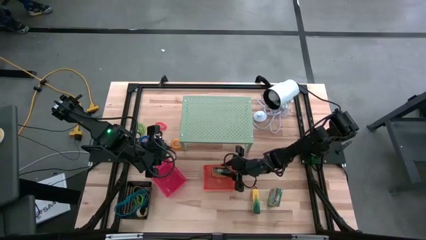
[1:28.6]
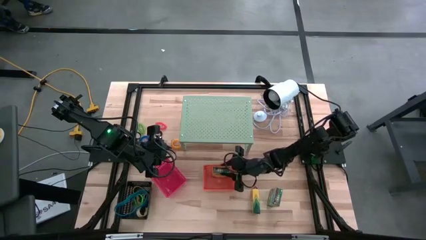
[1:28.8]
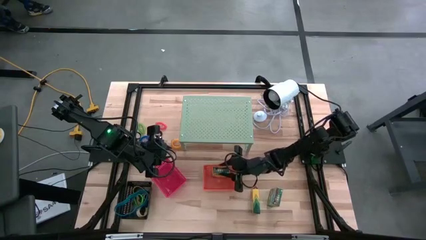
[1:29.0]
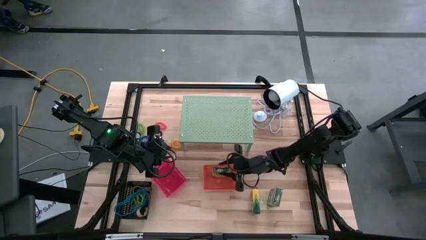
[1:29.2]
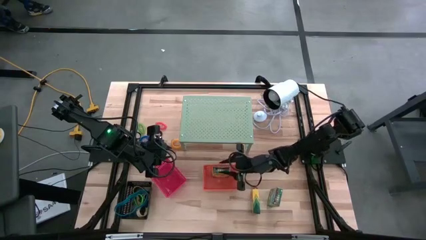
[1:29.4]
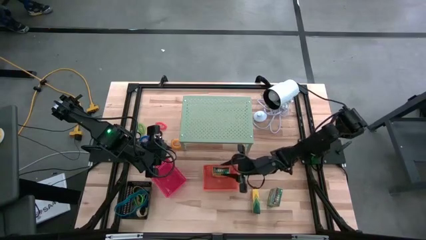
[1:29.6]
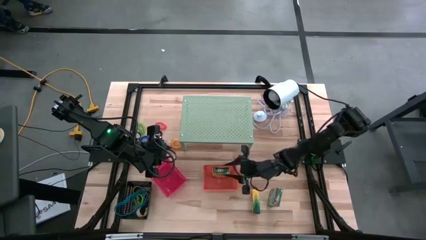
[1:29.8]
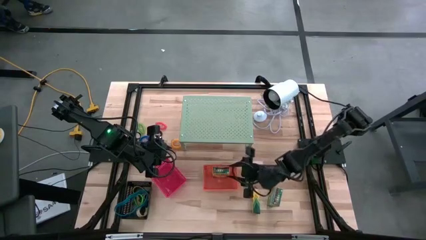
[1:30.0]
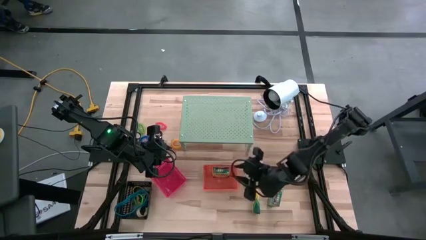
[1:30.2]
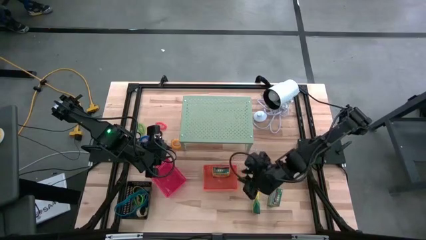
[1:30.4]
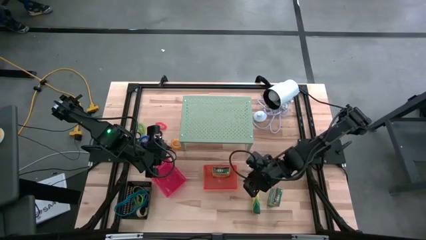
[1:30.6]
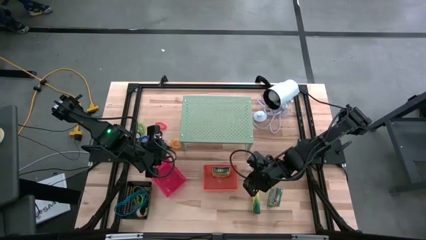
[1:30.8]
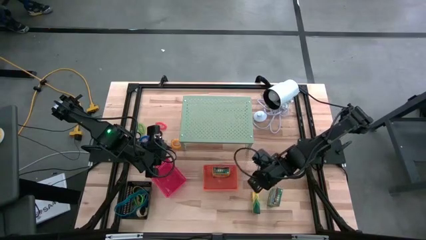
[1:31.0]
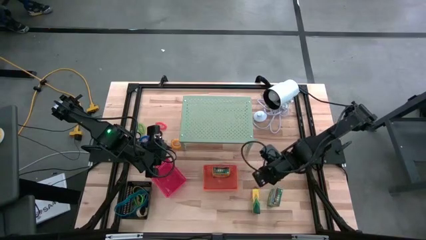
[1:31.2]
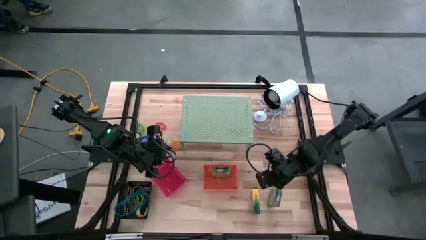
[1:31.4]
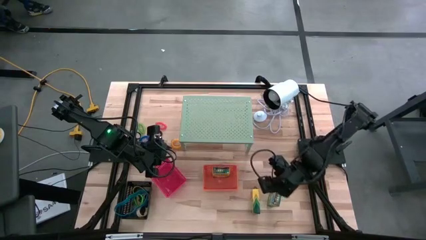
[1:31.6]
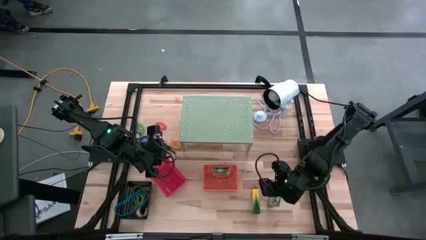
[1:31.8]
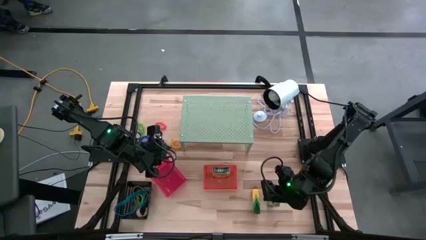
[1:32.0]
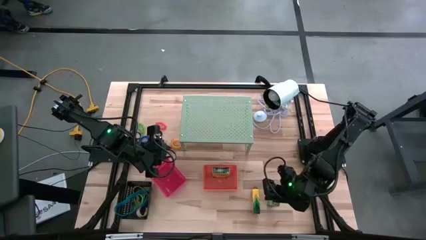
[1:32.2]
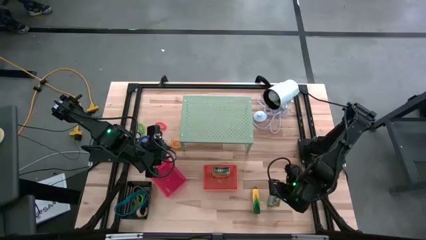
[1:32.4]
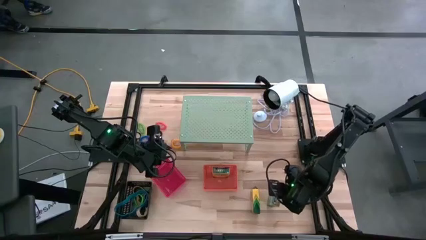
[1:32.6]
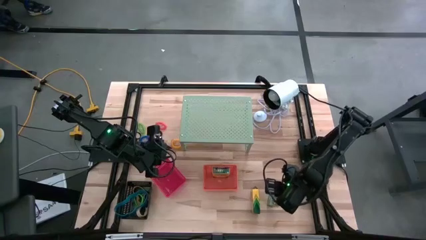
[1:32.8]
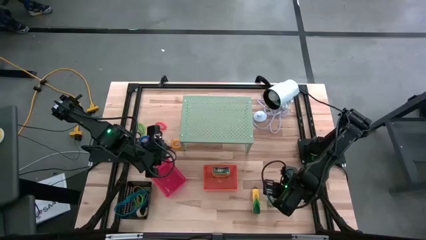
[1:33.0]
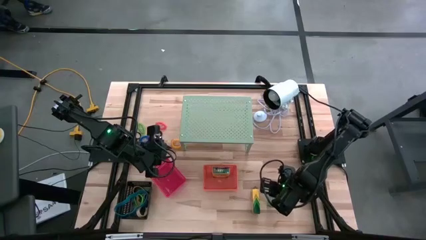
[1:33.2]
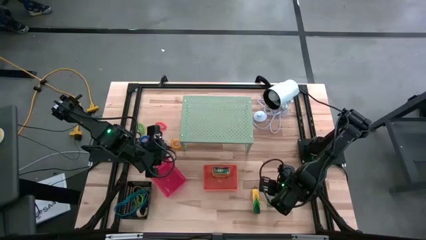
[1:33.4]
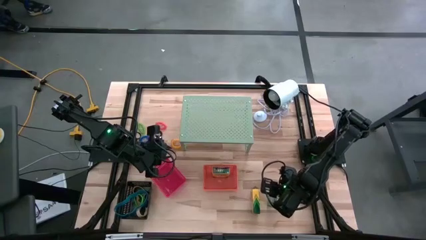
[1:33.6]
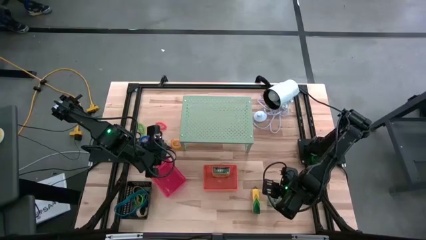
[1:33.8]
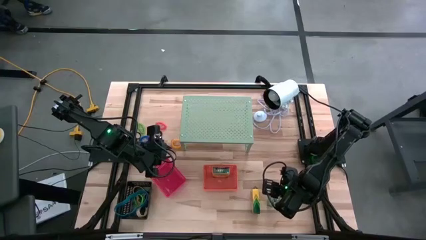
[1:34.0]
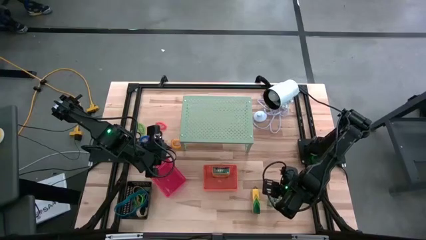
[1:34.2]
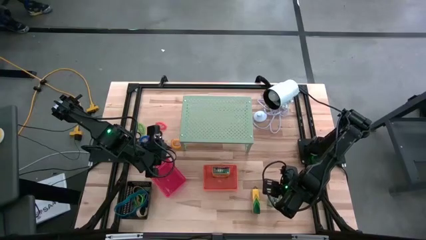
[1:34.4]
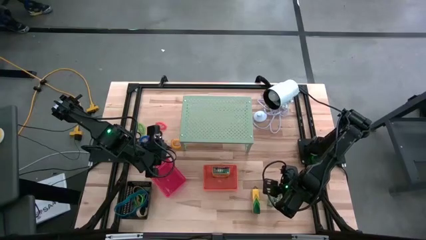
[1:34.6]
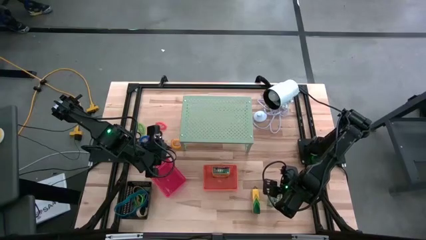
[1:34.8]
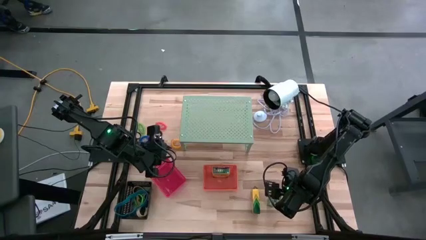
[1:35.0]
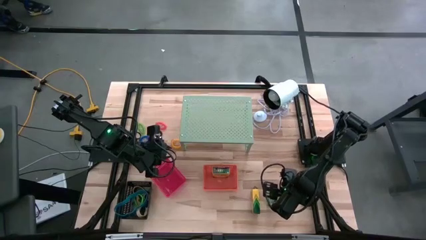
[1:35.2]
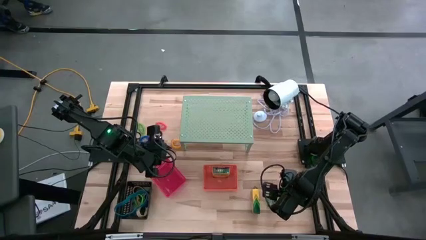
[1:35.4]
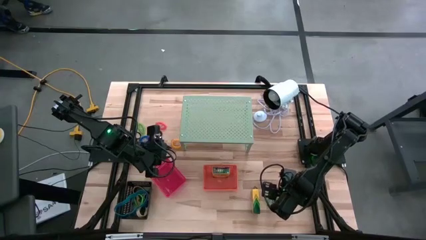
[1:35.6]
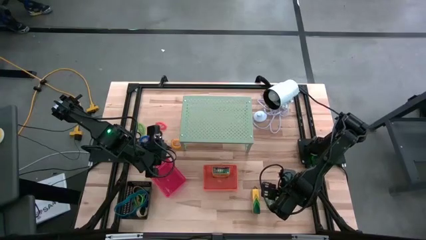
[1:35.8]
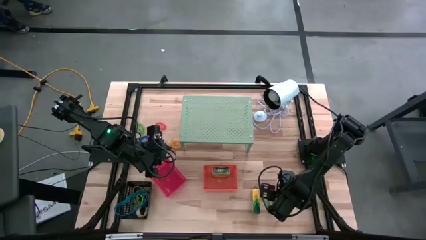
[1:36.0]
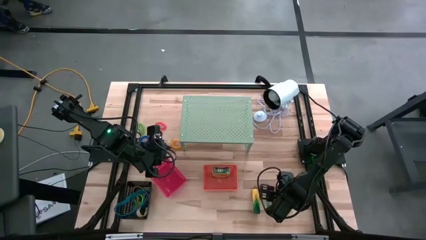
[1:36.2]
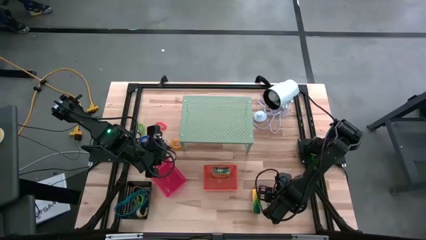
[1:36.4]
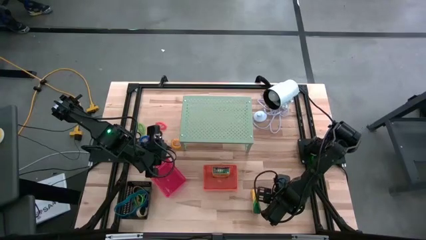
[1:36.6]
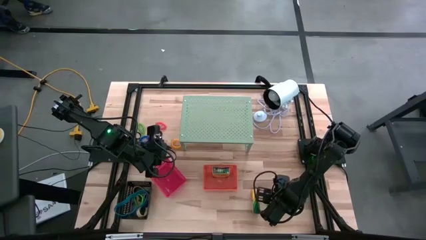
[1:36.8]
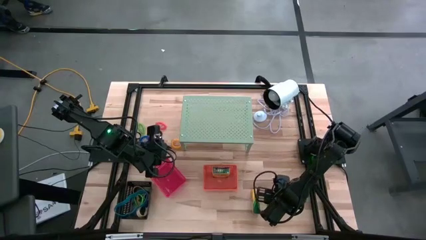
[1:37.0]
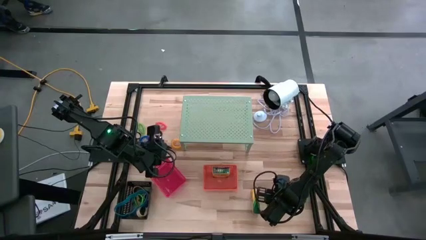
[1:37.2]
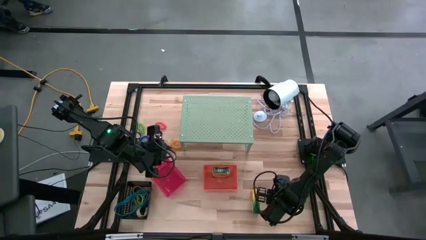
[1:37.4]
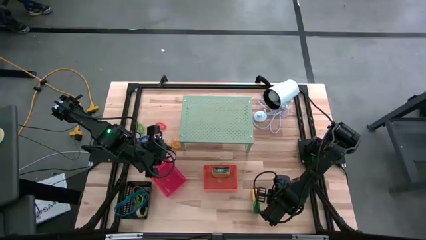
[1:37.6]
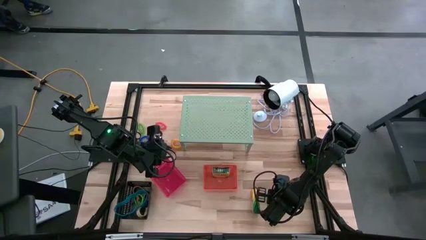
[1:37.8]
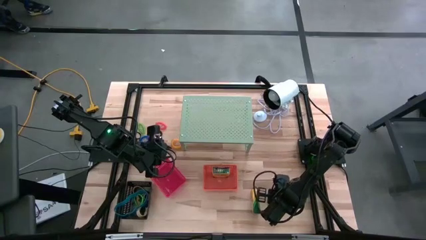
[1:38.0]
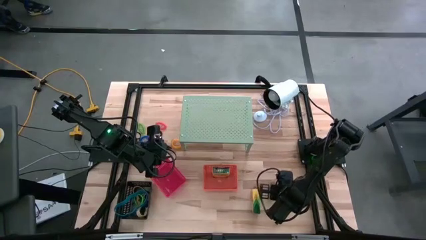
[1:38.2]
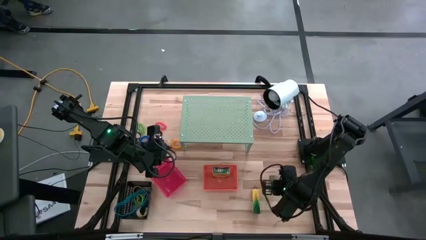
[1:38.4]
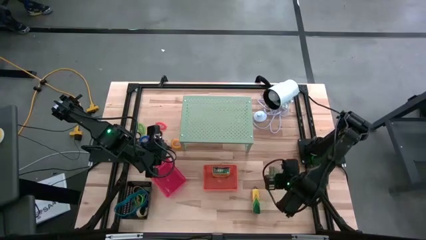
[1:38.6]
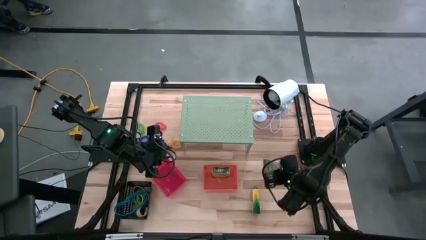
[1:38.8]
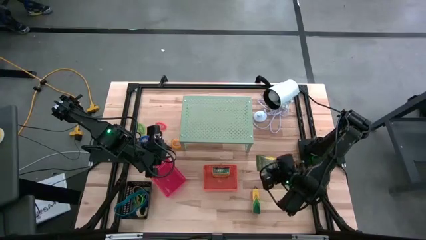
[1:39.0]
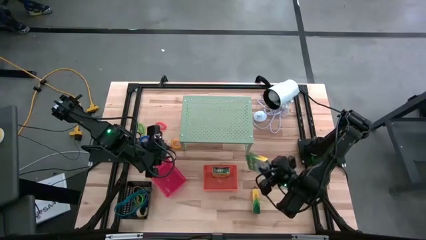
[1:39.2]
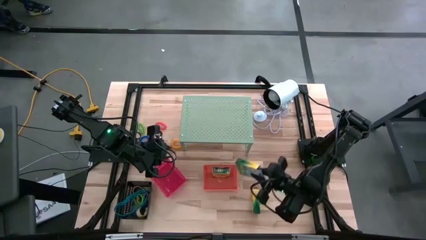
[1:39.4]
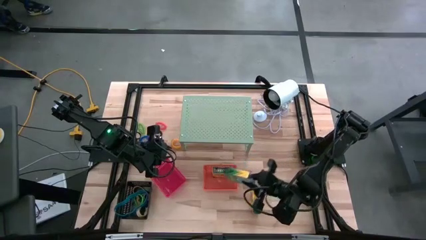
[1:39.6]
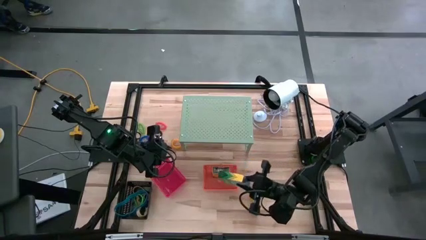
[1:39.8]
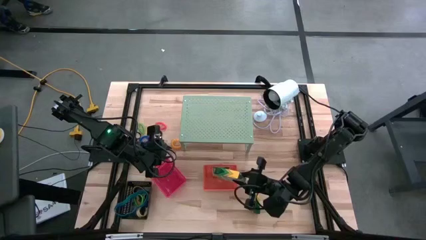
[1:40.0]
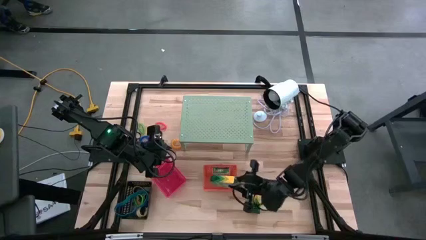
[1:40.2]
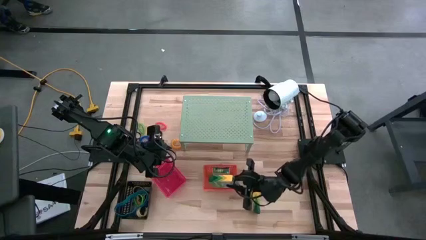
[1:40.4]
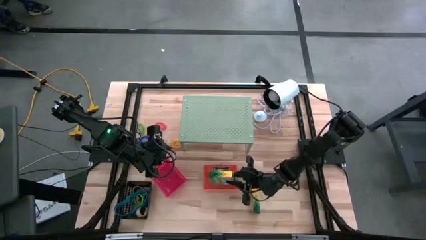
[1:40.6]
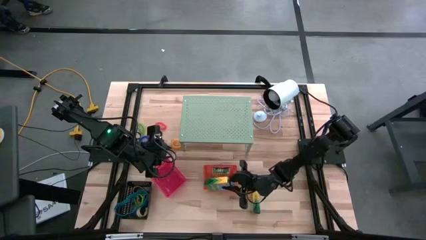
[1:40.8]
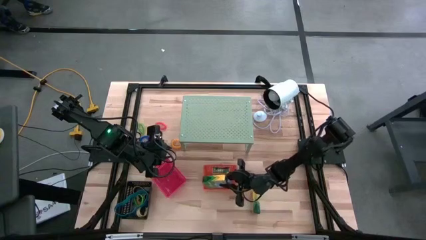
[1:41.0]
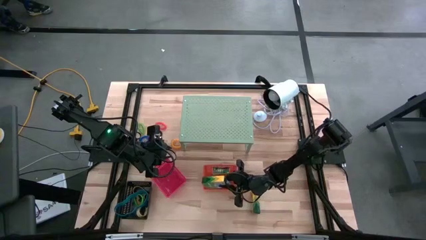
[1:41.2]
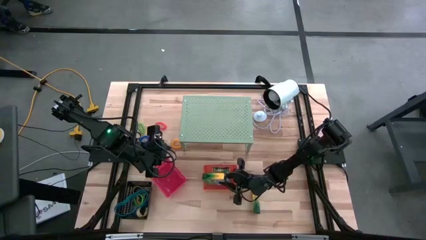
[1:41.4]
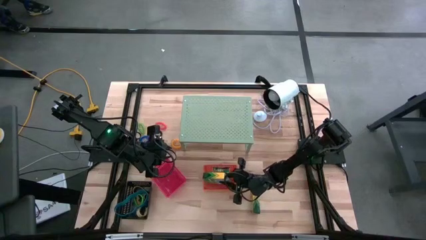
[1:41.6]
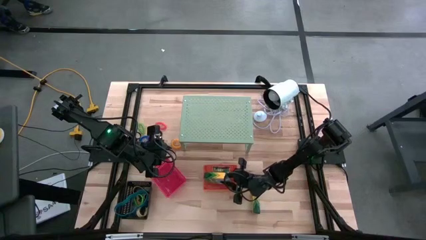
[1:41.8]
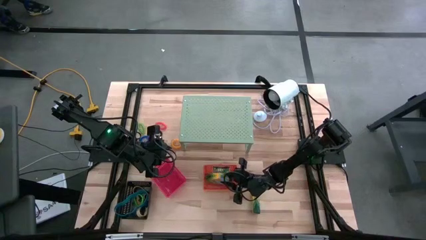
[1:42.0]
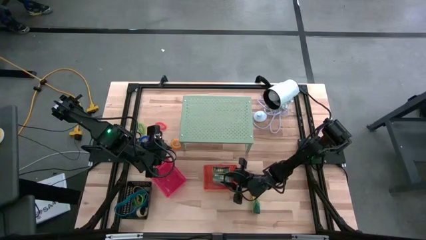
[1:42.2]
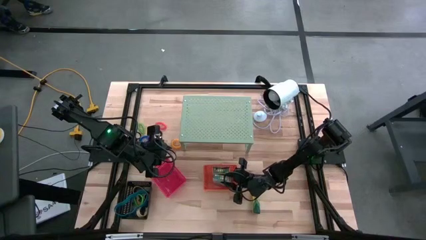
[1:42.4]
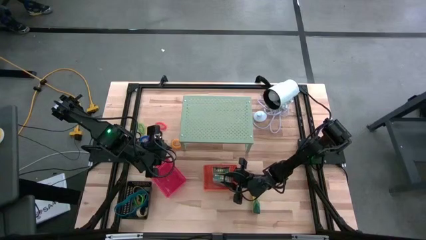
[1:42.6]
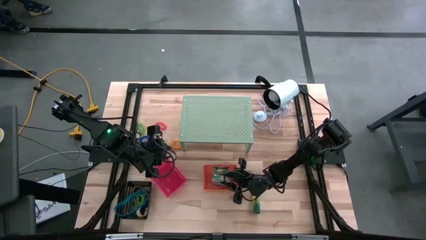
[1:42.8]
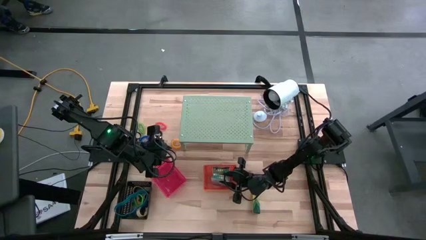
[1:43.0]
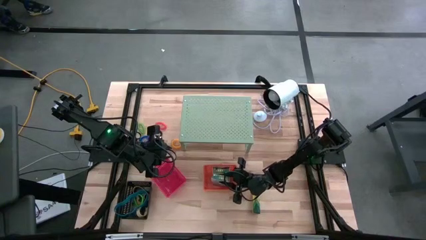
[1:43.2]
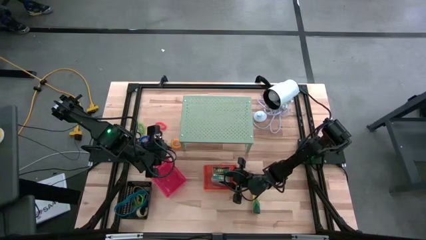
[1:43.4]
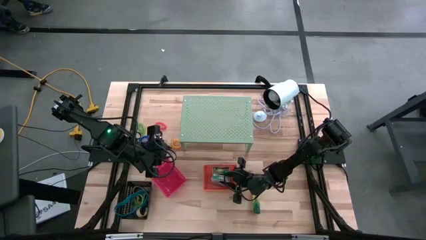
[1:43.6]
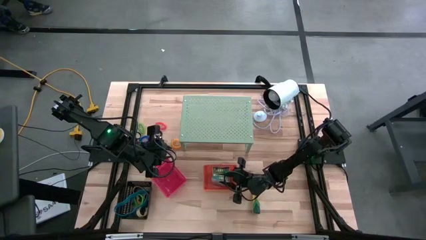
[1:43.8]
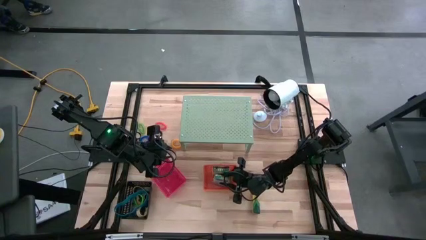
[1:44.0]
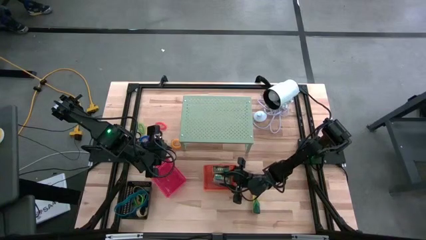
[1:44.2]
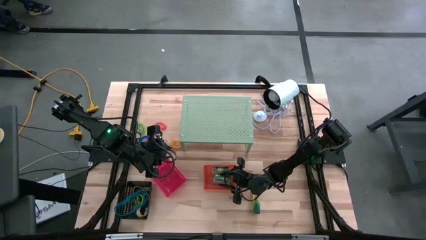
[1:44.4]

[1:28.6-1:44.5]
Task: Pick & Place Office Desk Supplies
Put the right crayon box into the orange bin

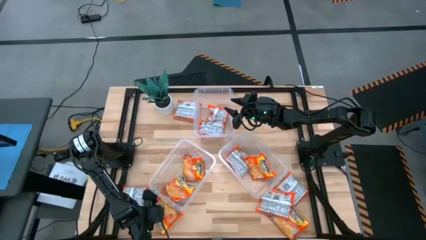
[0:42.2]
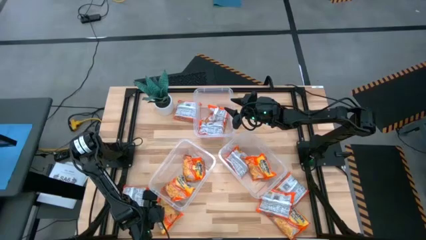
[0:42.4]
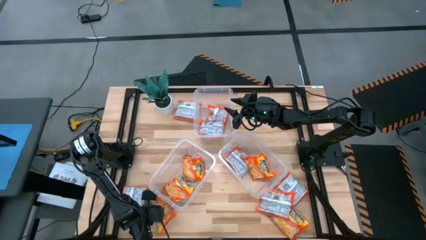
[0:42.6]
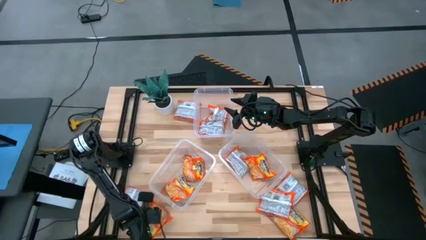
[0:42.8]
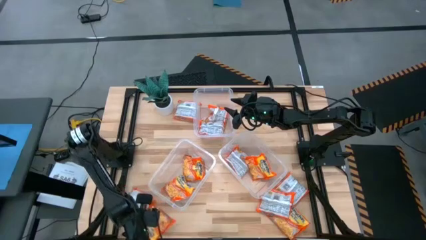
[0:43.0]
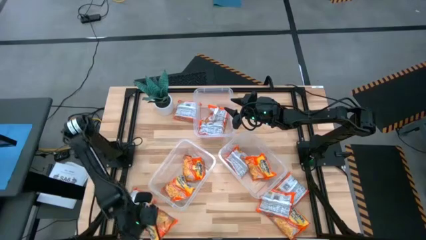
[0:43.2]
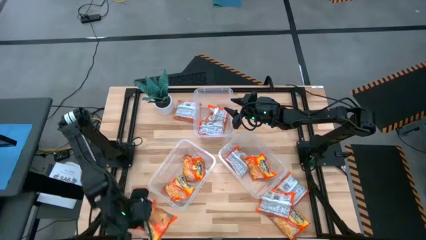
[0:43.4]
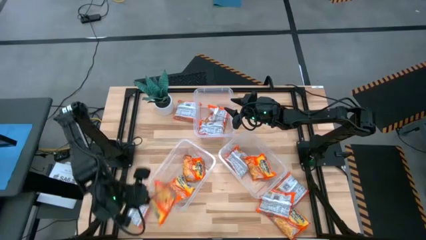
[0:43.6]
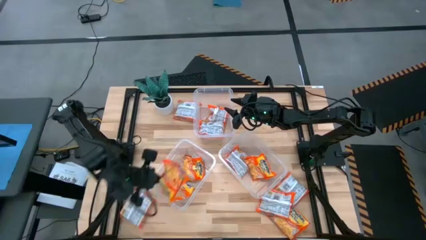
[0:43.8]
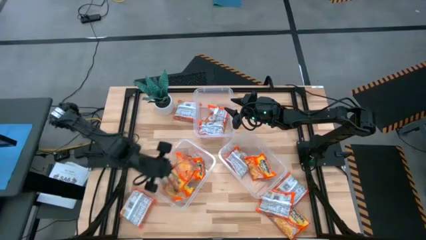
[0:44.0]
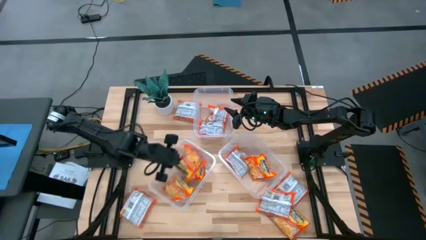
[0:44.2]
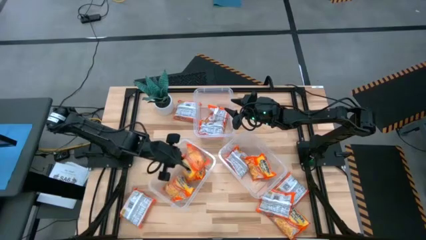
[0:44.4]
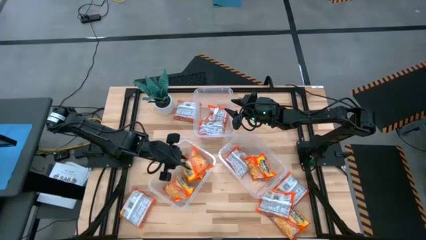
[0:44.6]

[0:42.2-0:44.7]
Task: Sort Maruchan noodles
Put the noodle pack into the bottom left transparent bin
